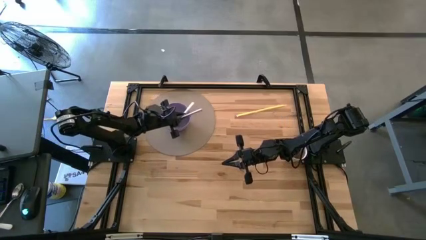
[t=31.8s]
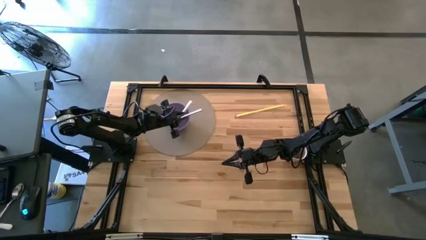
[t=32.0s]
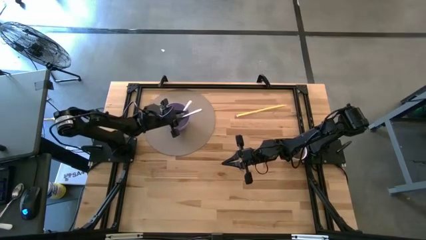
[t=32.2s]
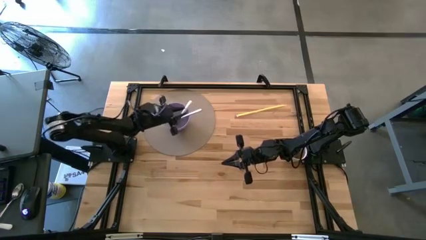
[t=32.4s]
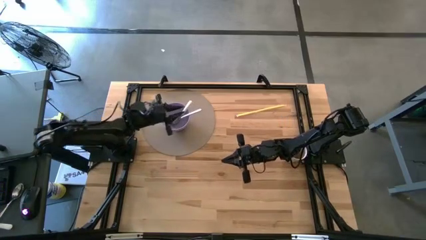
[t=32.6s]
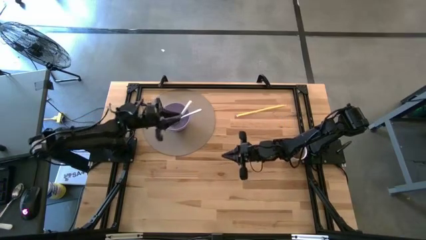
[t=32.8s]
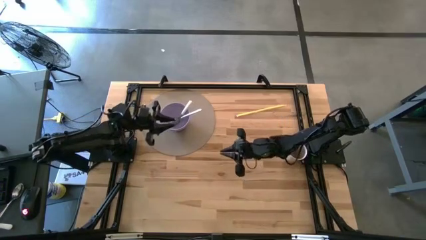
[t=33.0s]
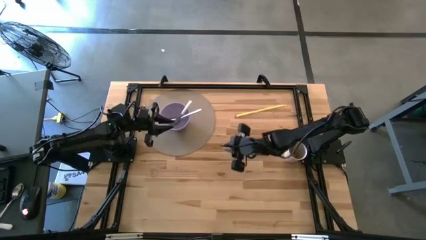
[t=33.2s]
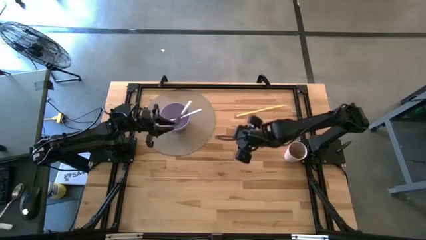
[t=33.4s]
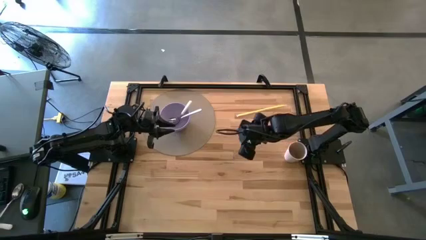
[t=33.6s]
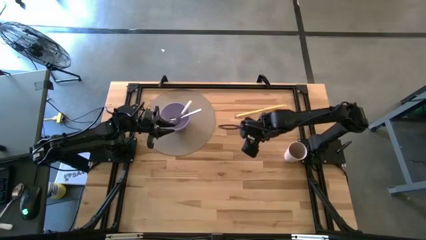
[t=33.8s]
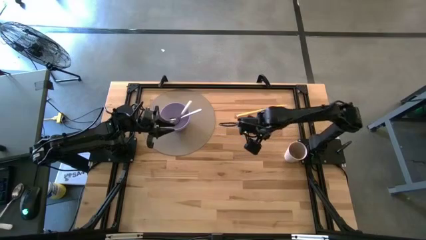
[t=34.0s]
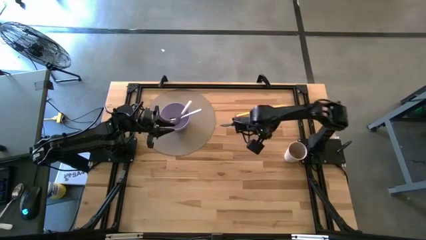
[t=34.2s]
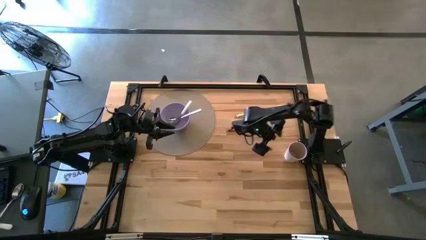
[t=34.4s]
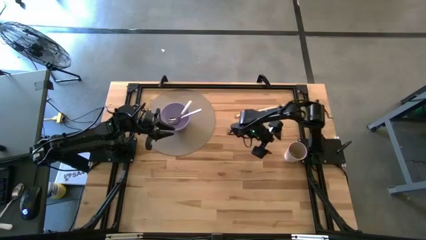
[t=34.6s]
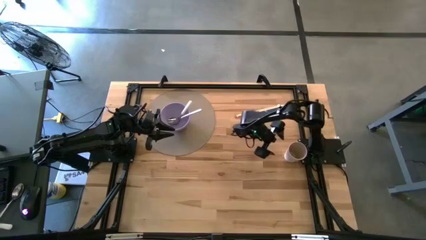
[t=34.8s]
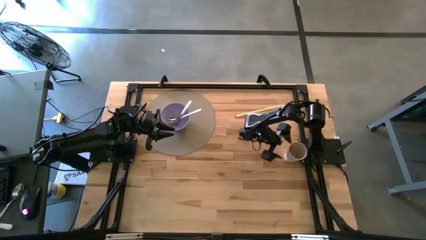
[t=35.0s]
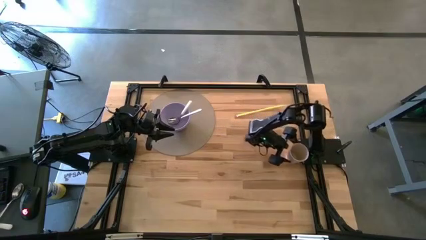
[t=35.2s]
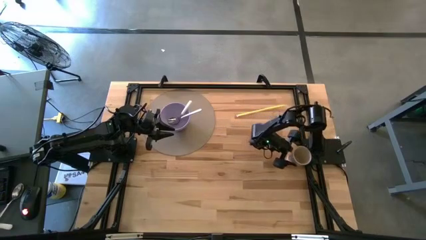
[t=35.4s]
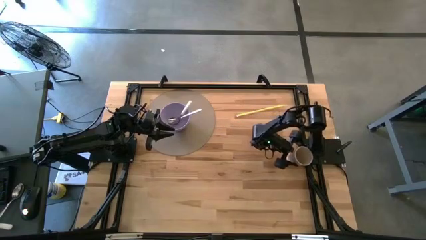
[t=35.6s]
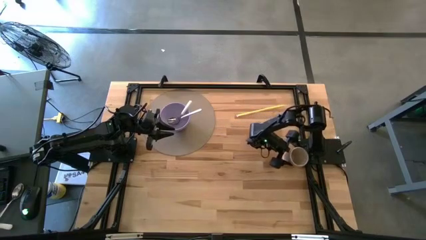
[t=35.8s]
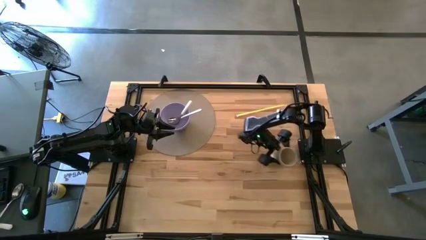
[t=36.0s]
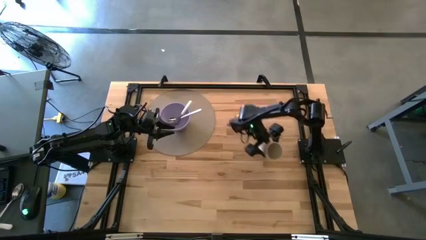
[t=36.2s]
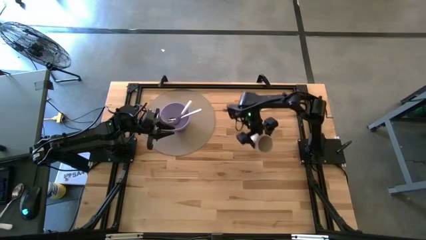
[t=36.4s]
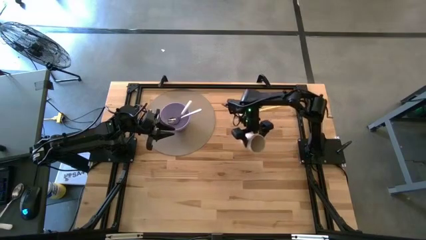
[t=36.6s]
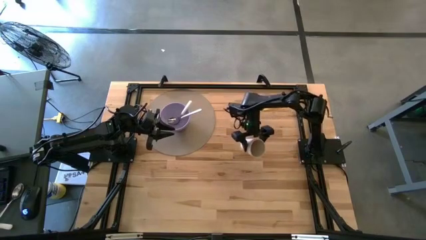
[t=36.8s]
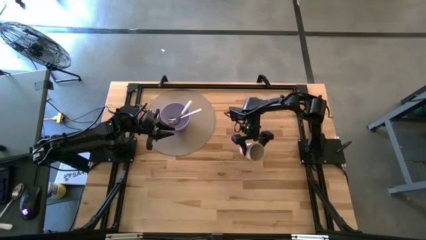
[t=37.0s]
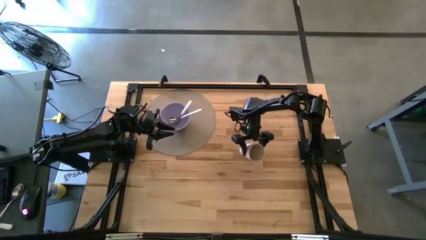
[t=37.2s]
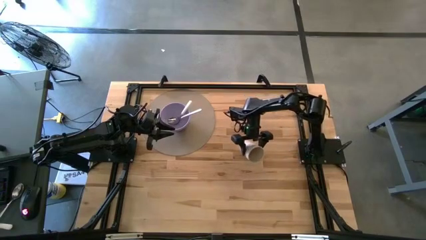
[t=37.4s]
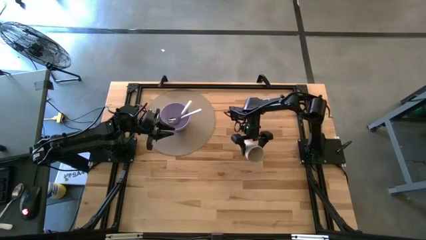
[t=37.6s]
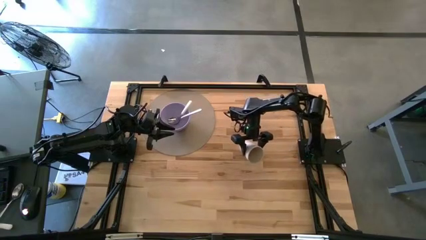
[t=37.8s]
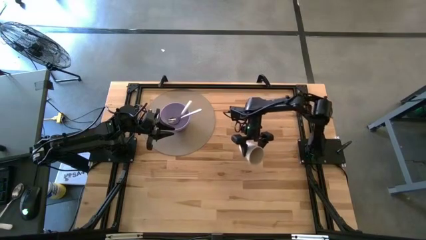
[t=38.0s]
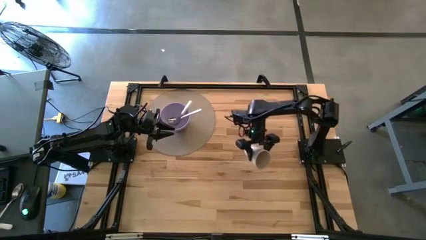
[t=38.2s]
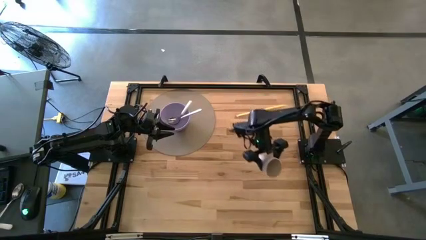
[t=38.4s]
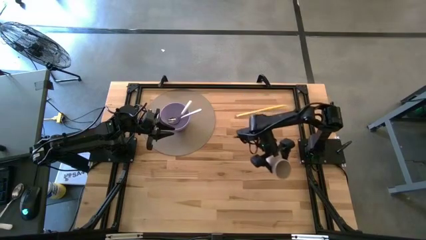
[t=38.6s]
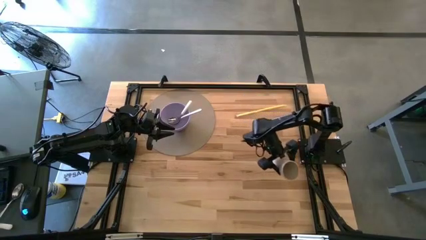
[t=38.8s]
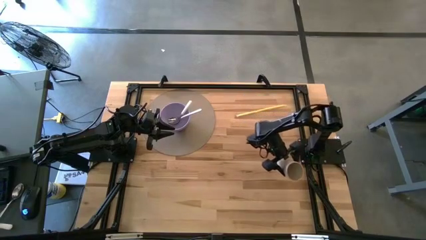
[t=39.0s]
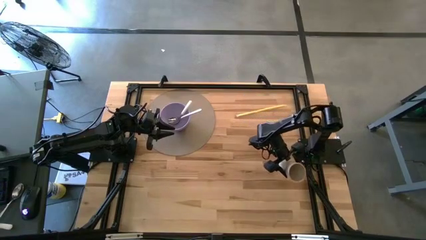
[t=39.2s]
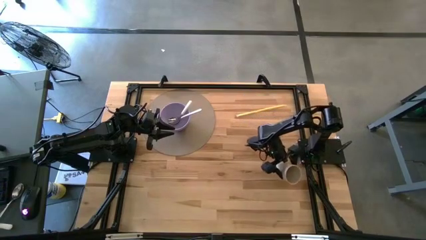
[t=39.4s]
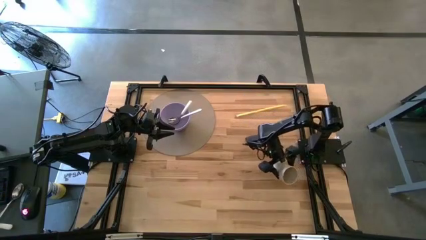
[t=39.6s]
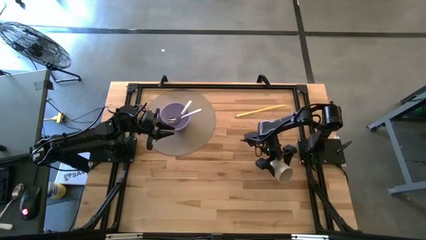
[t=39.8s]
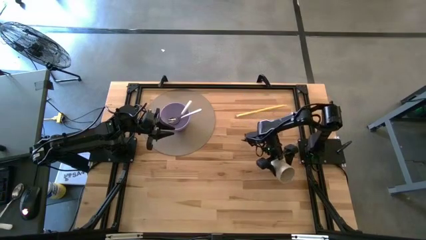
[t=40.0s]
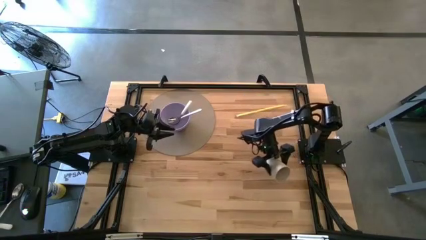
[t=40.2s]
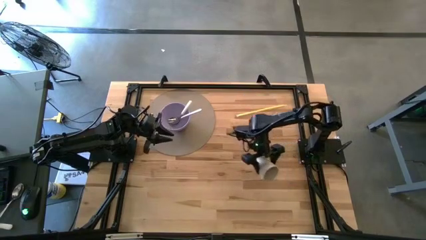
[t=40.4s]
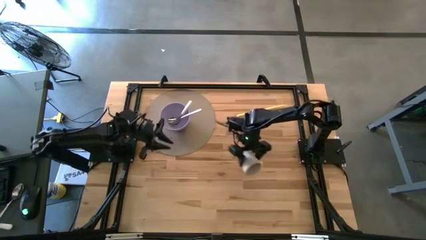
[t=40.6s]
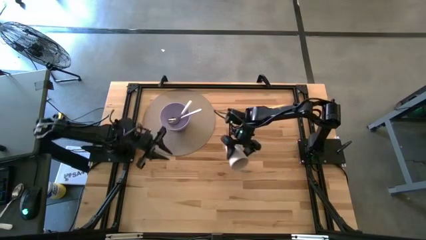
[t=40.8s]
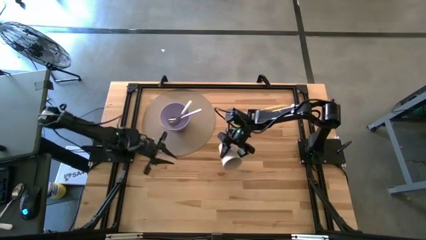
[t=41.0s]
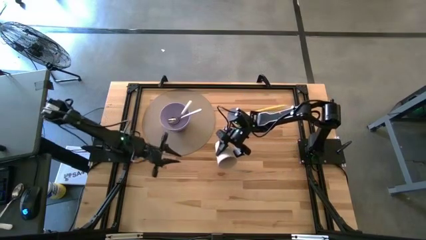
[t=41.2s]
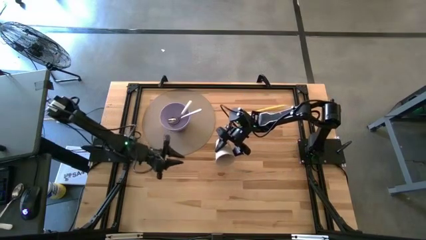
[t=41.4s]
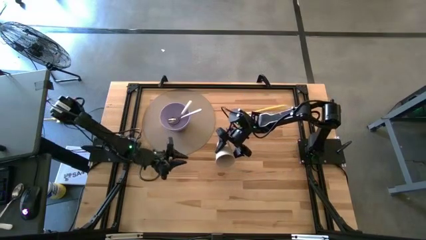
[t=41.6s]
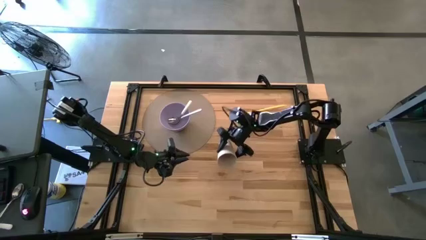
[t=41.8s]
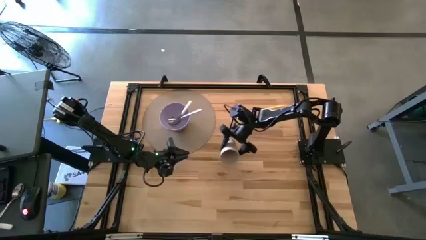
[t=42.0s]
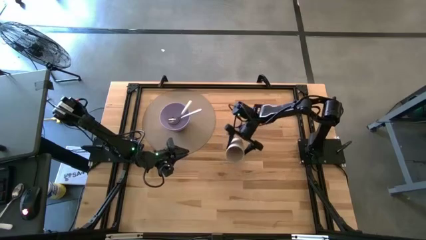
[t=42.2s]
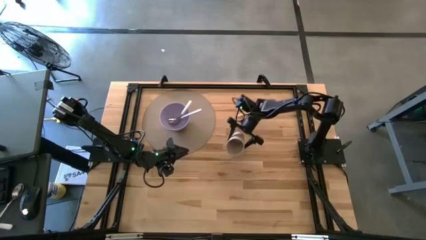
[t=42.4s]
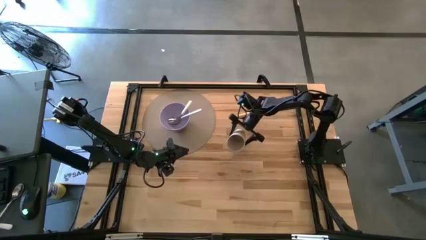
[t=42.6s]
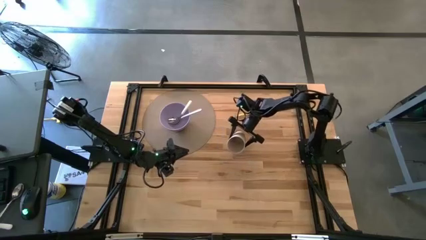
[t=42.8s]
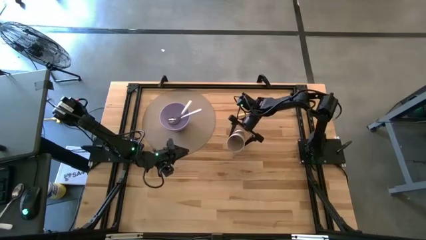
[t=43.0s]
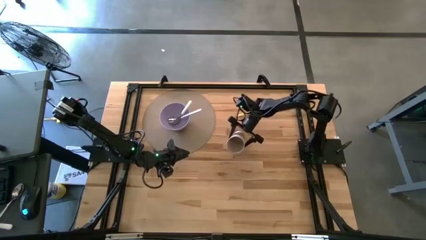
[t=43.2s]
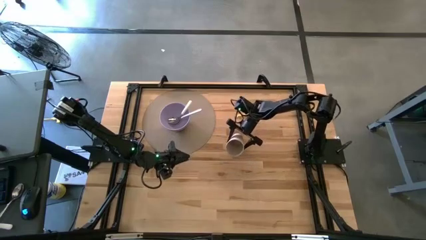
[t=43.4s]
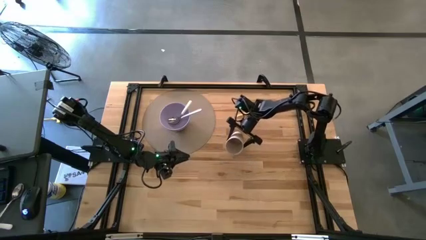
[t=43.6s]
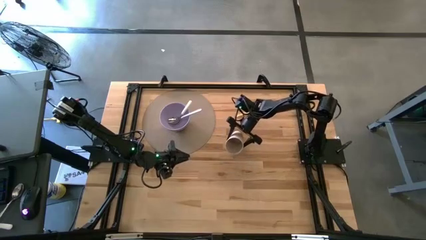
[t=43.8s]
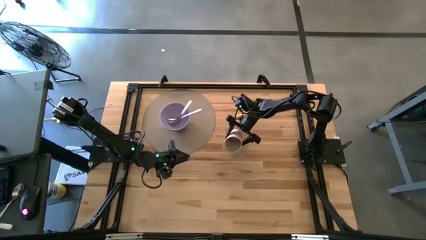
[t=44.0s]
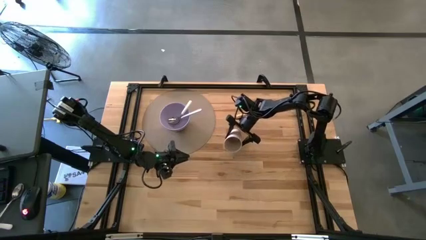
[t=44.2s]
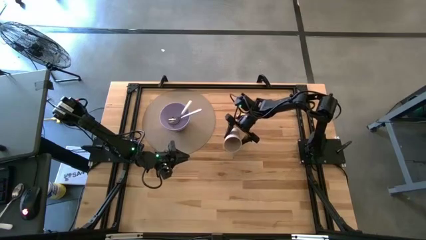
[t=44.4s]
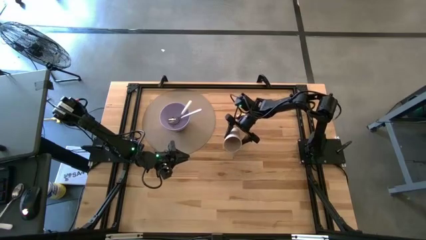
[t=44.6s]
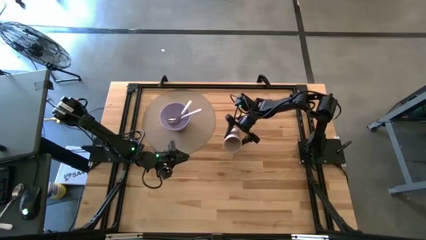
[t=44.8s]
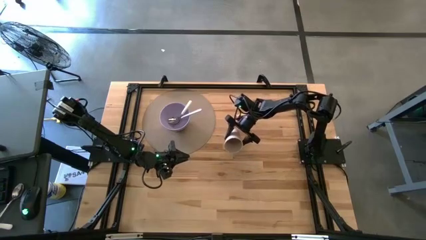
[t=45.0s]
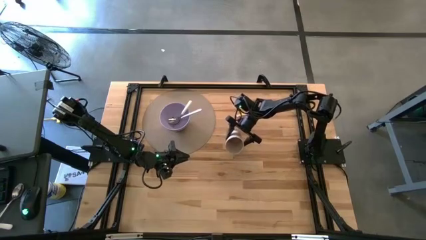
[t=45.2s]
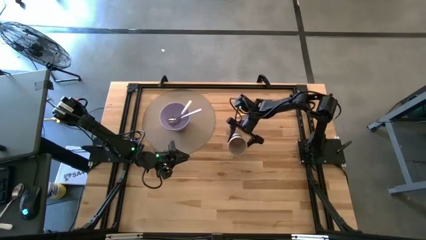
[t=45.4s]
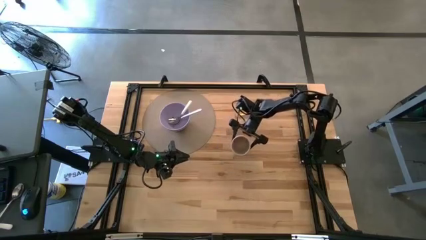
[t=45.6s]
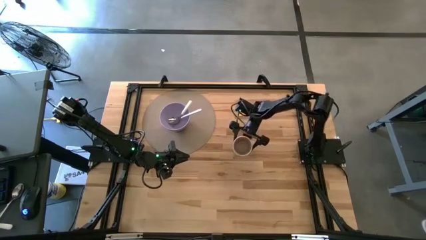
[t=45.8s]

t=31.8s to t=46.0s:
Task: Pick & Place Utensil
Put the white cup on the brown mat to the top right of the violet bowl
